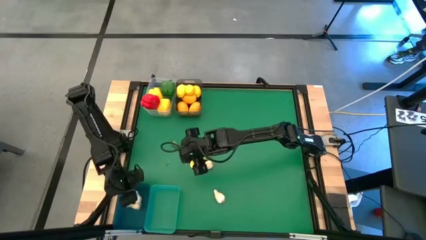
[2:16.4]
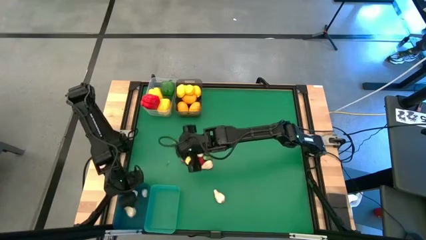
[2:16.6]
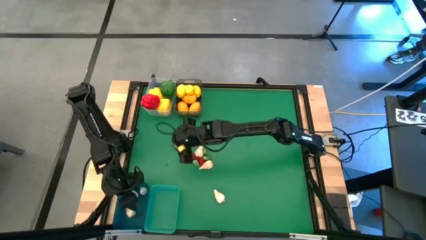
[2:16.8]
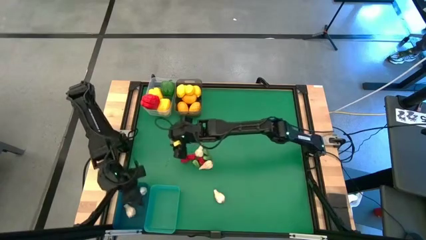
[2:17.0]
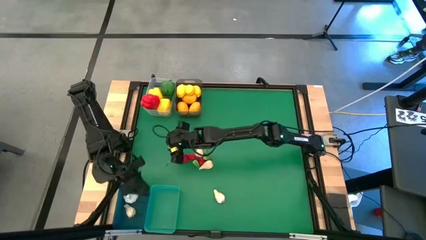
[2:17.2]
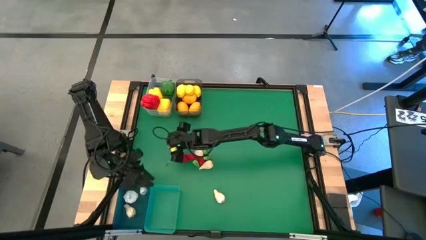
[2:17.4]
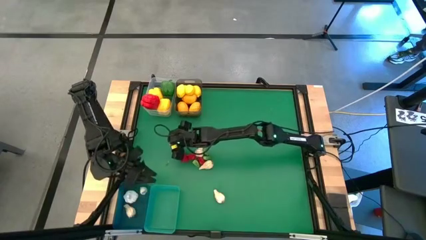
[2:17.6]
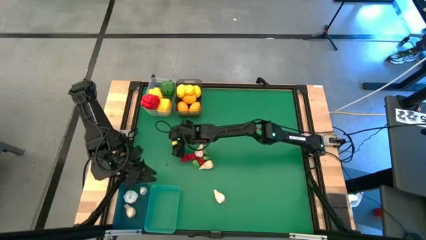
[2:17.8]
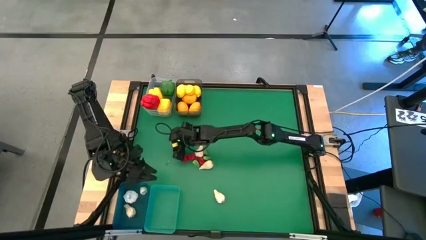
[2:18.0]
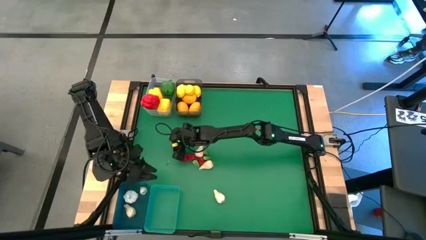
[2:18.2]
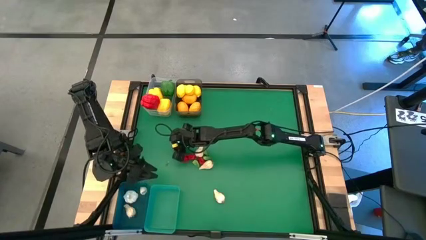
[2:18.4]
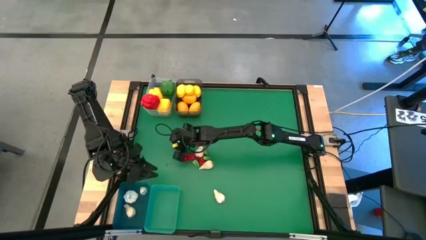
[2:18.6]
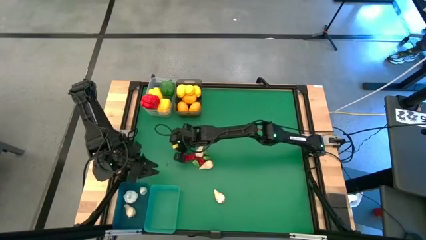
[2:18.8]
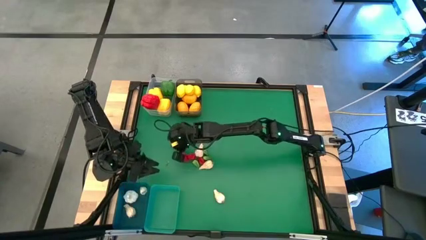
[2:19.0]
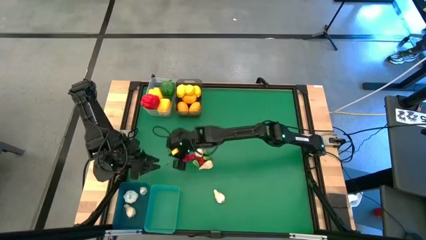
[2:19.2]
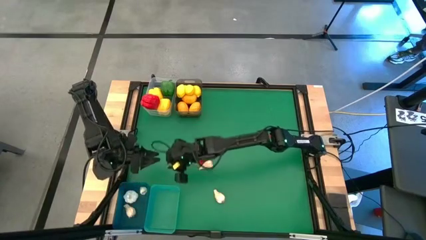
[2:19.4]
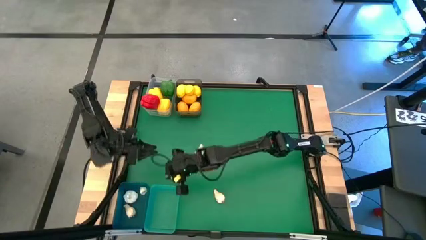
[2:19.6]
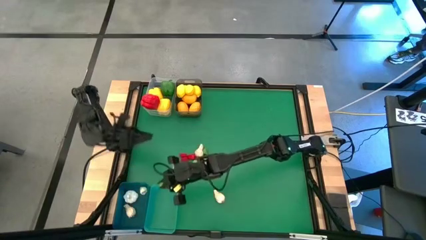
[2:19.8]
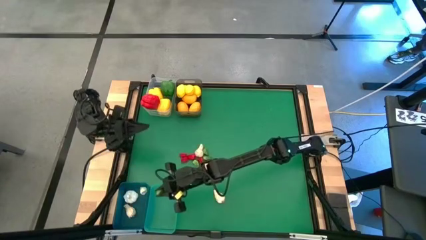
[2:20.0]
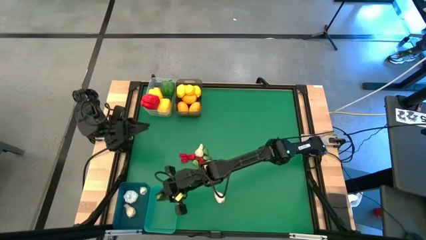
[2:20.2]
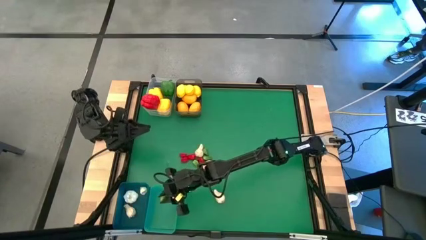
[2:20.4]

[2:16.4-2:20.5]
Task: Sort produce into baskets
Put the green chili pepper into the green bin

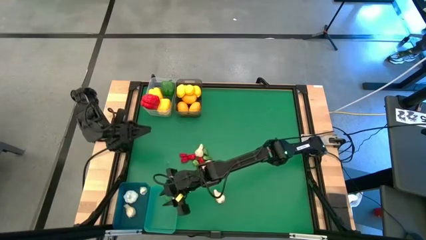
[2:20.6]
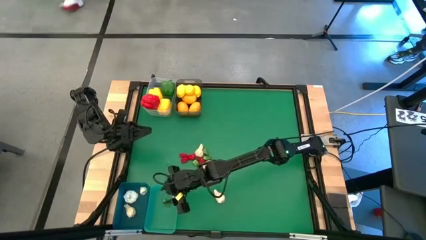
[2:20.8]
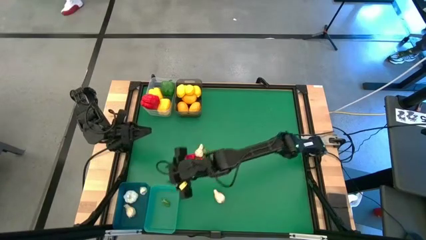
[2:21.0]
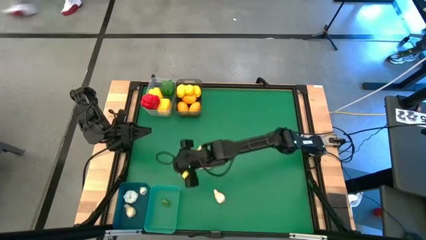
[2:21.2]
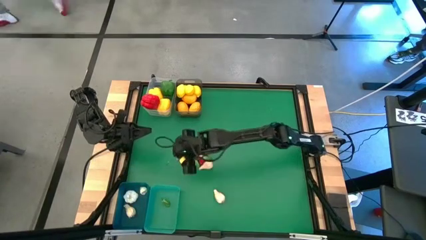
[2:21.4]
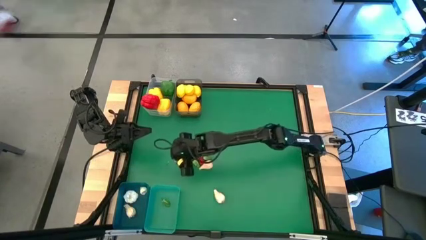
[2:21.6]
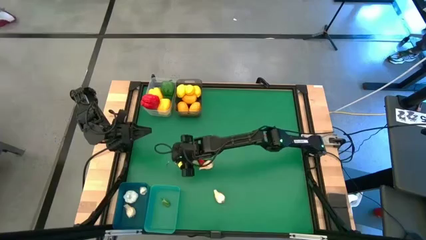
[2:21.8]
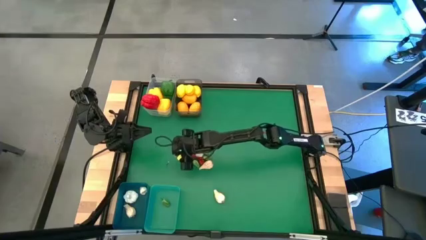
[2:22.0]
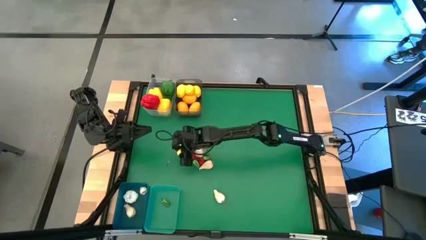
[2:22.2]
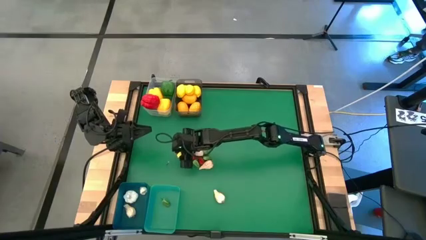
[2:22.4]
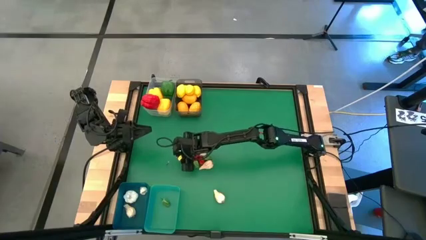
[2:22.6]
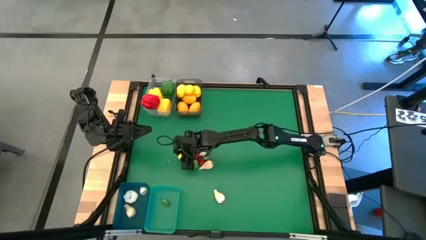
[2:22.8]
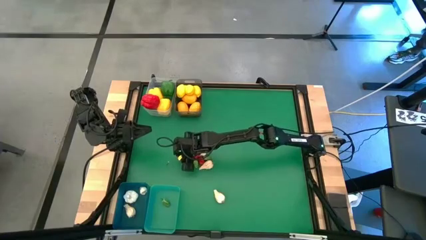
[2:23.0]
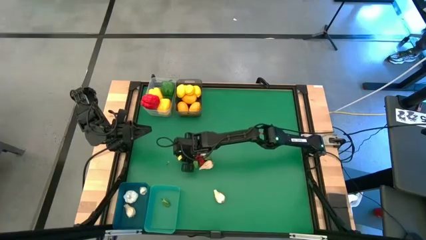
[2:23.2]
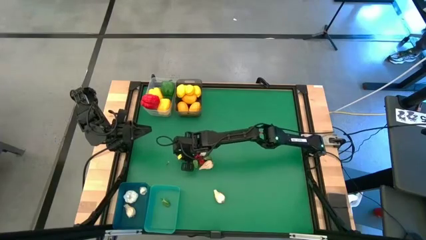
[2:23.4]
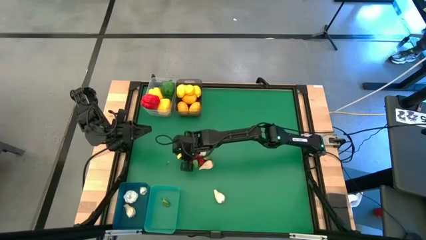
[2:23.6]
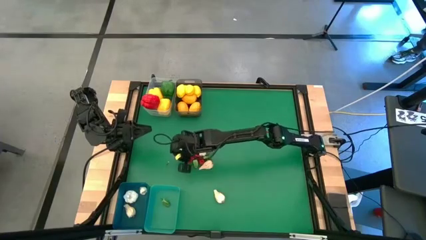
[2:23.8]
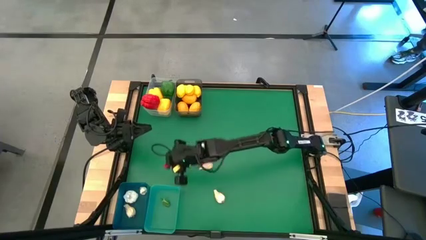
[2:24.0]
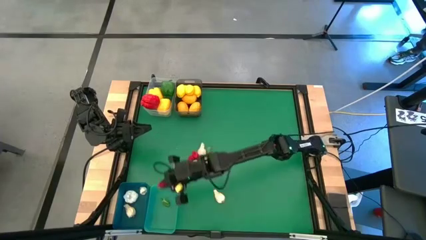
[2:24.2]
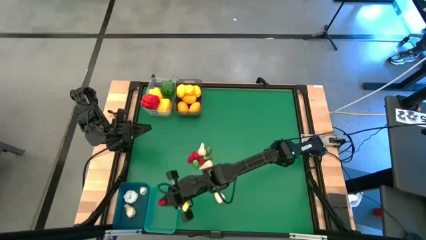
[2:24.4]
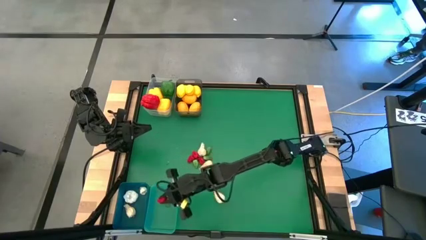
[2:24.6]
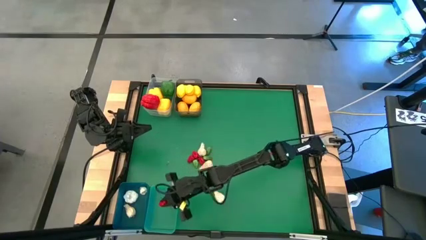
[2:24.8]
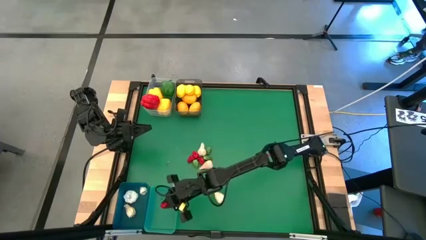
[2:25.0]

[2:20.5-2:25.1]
Put the red chili pepper into the green bin

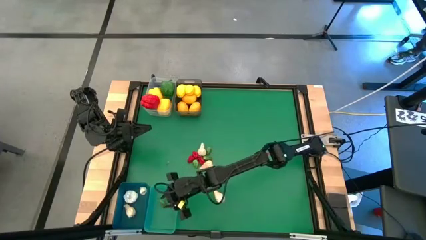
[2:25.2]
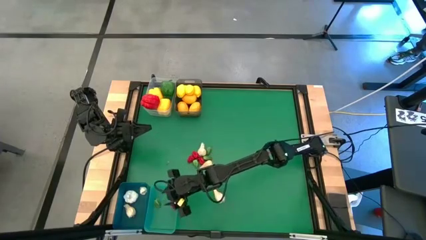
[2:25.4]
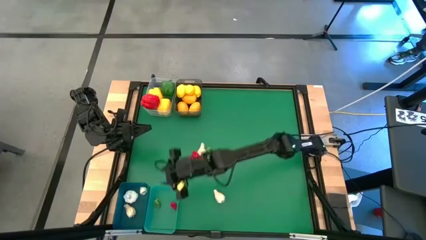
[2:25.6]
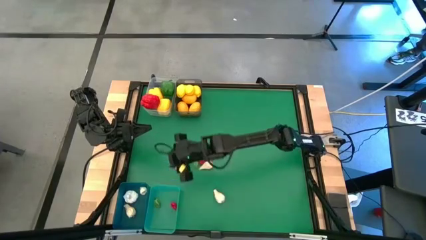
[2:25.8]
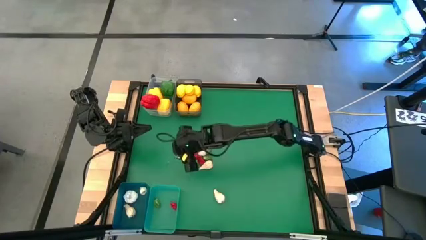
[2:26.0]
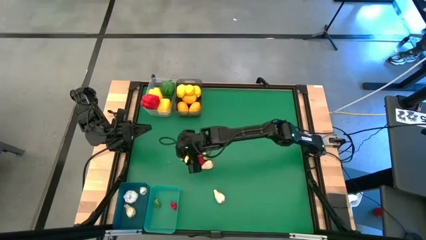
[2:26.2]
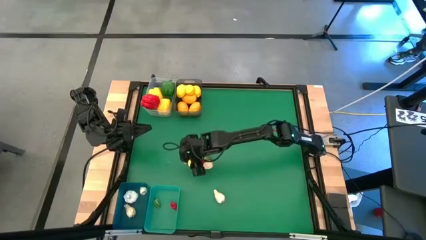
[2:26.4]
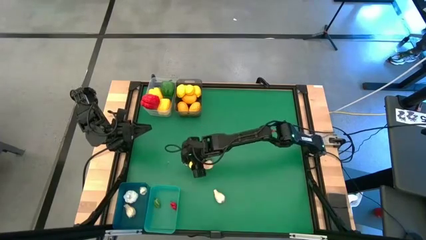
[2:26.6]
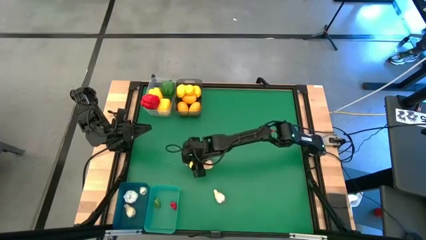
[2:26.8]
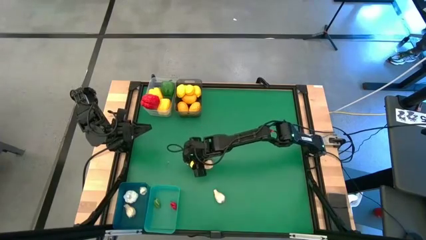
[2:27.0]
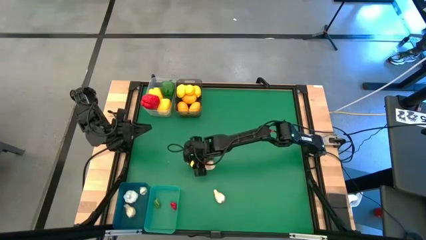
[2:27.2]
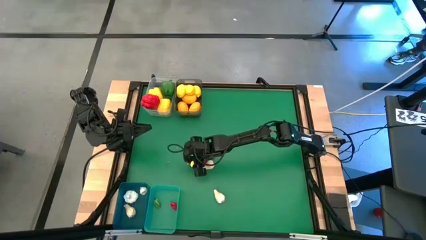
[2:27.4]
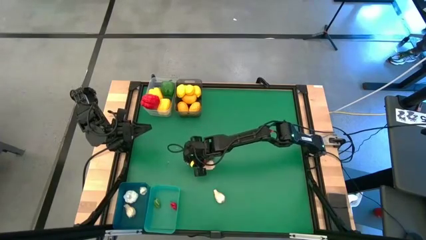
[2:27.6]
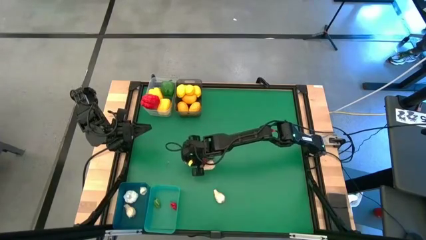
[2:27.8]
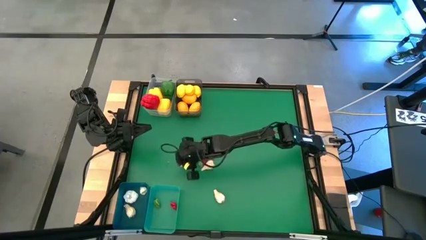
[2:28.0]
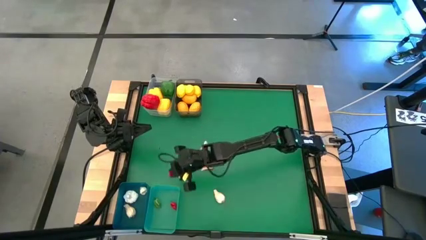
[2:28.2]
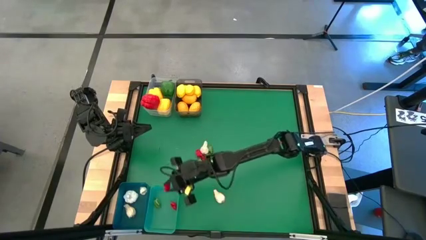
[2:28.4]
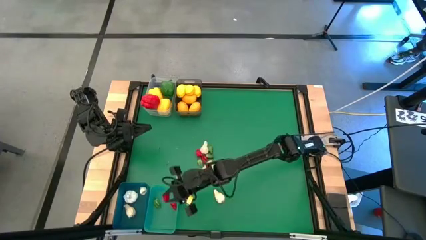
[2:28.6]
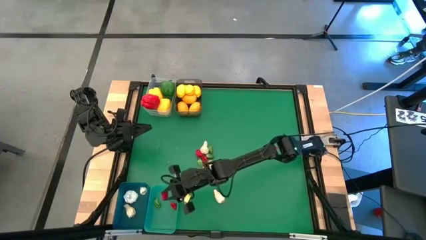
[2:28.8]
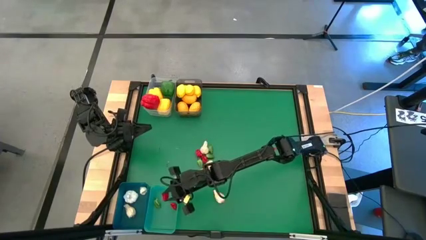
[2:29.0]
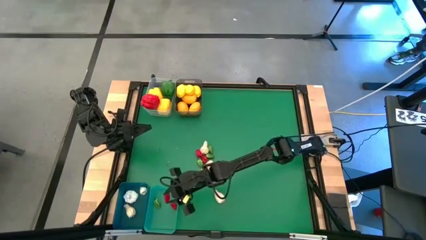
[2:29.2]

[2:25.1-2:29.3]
Put the red chili pepper into the green bin

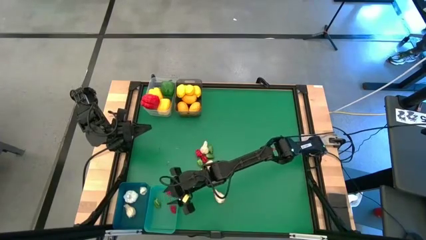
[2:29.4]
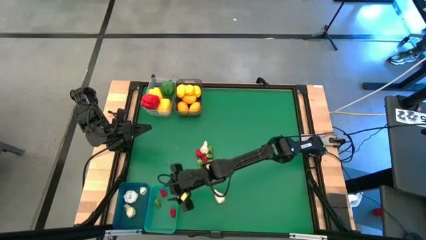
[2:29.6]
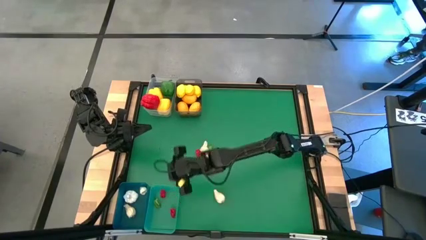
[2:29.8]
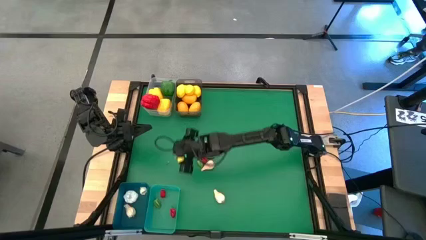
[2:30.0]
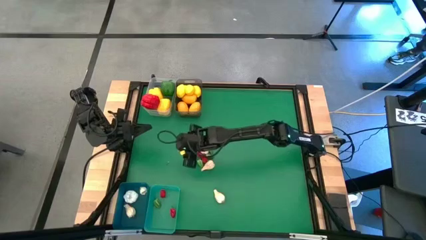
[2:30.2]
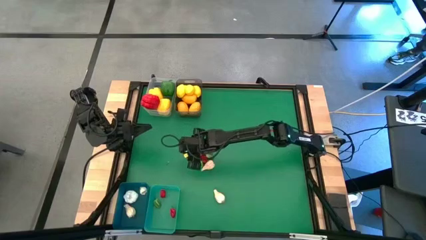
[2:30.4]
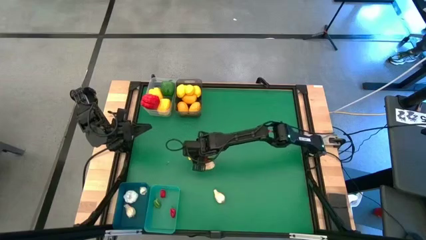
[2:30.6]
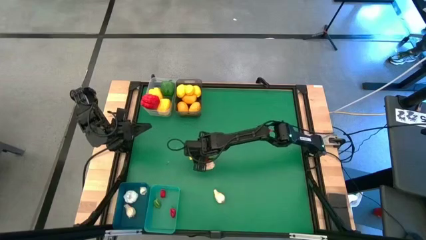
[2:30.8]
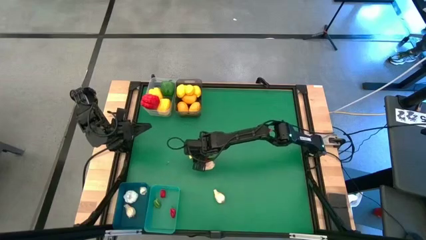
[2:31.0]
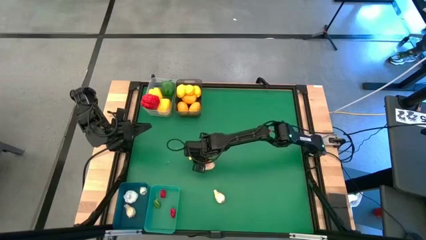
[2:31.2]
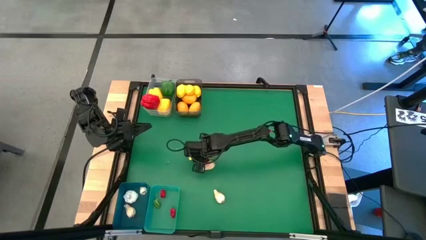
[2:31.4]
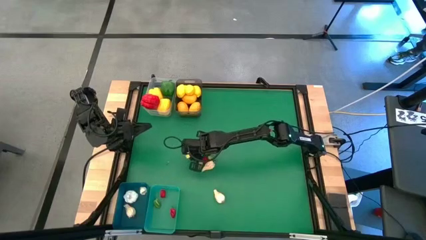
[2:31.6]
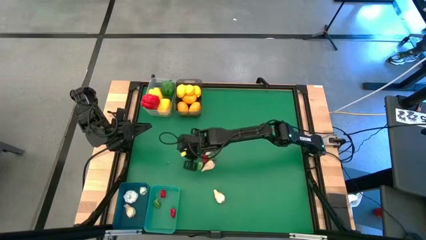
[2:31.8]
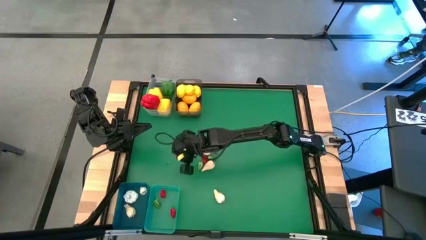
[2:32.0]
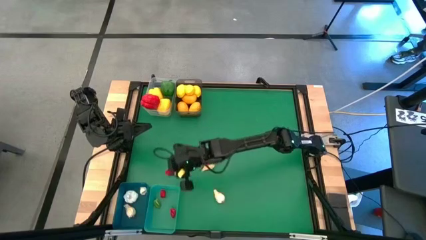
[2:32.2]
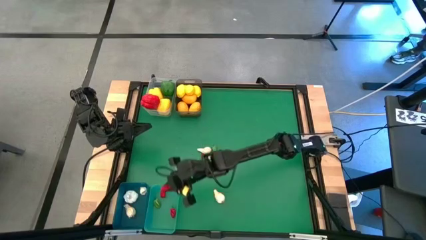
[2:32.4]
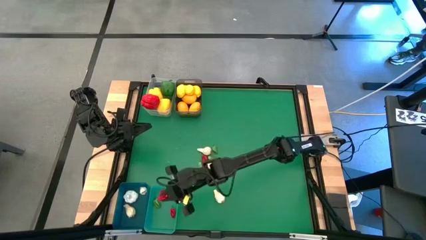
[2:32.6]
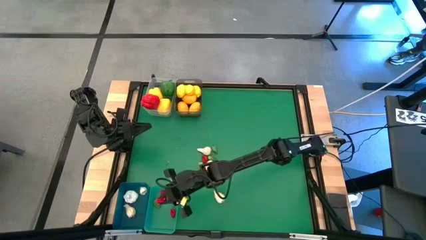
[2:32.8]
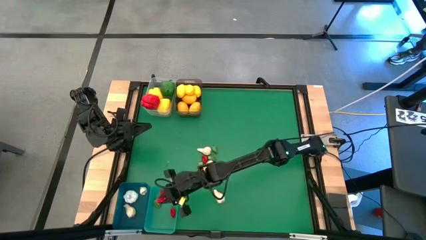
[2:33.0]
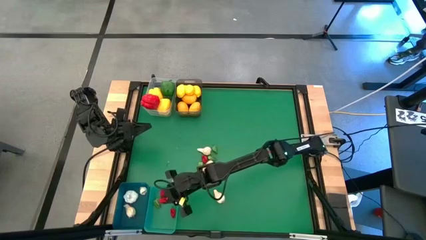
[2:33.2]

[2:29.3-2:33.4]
Put the red chili pepper into the green bin
